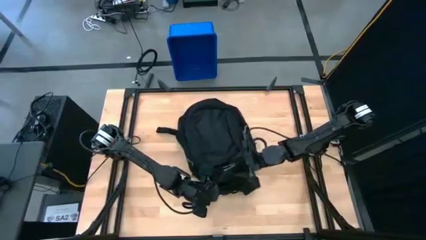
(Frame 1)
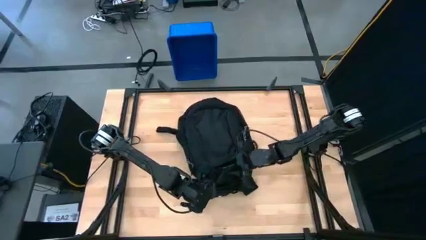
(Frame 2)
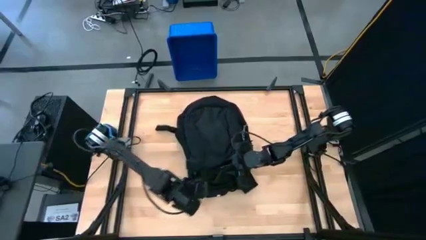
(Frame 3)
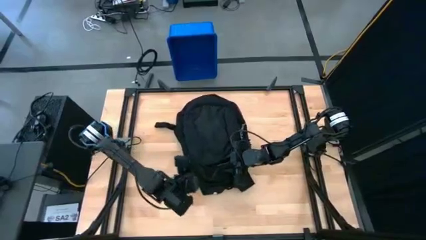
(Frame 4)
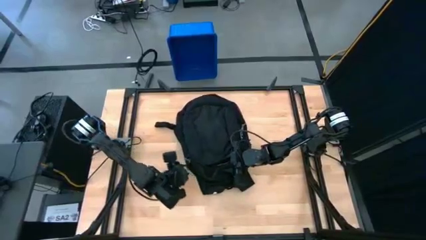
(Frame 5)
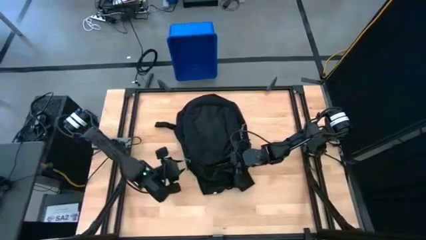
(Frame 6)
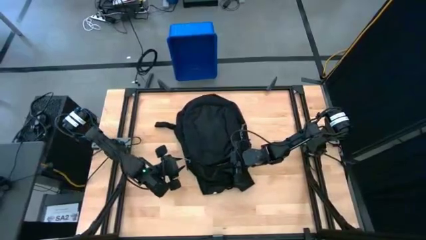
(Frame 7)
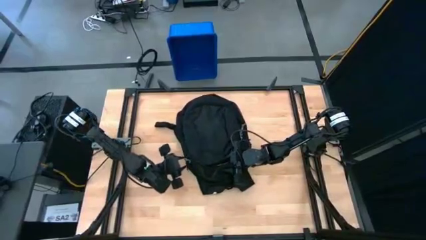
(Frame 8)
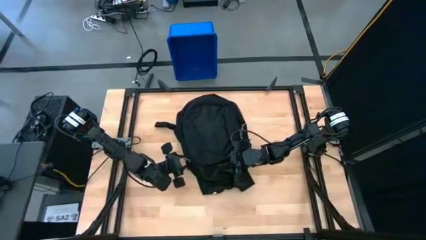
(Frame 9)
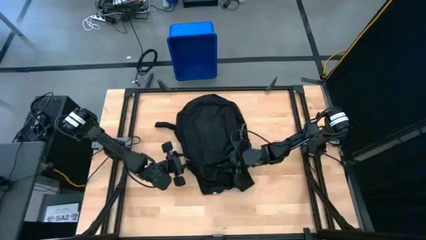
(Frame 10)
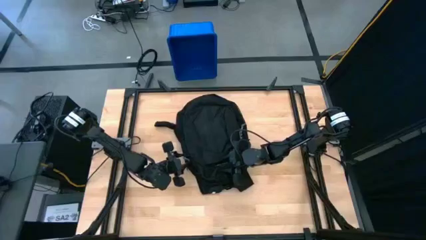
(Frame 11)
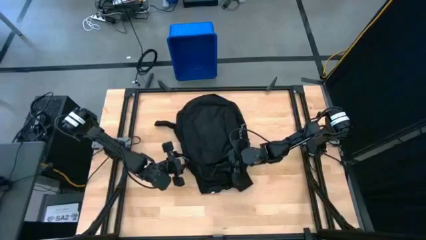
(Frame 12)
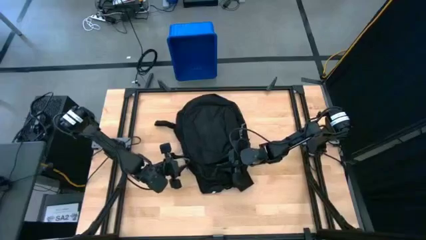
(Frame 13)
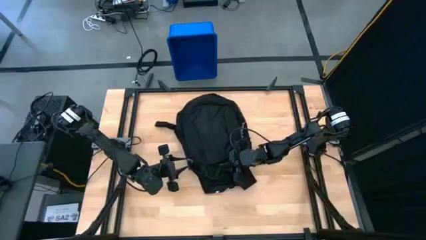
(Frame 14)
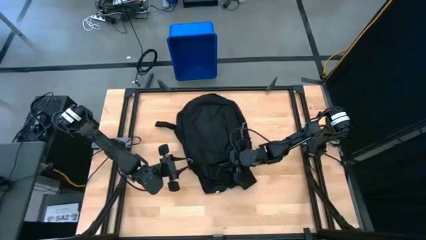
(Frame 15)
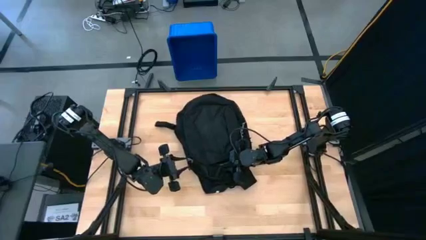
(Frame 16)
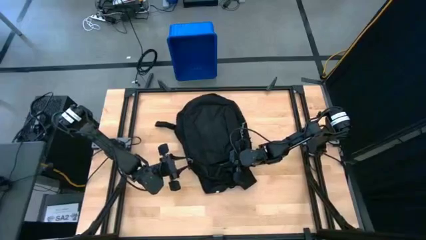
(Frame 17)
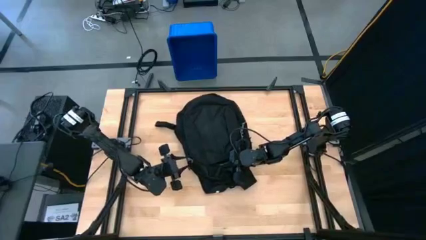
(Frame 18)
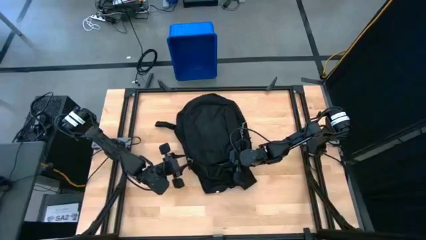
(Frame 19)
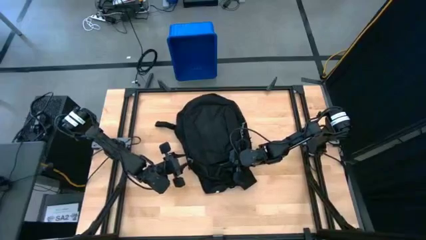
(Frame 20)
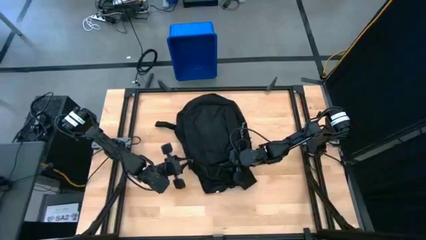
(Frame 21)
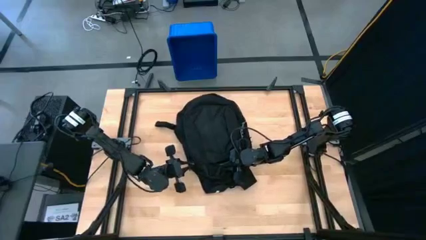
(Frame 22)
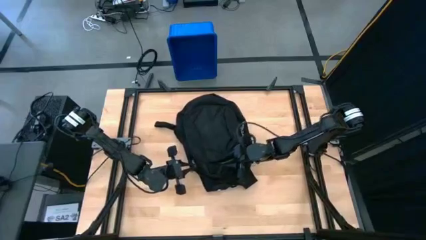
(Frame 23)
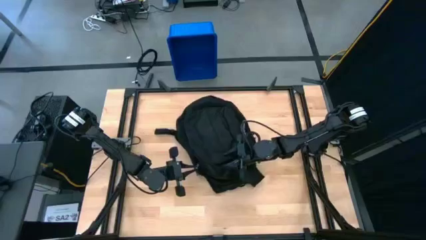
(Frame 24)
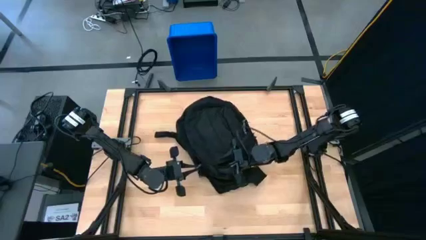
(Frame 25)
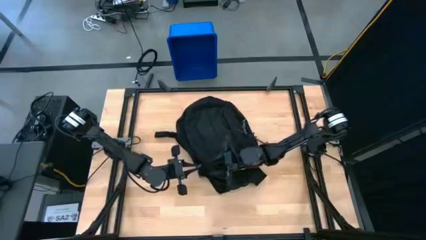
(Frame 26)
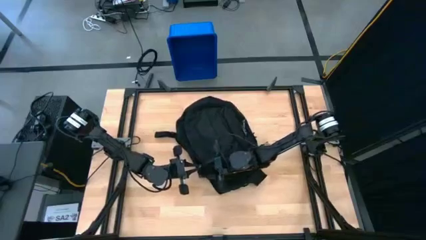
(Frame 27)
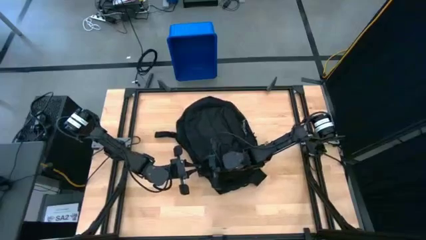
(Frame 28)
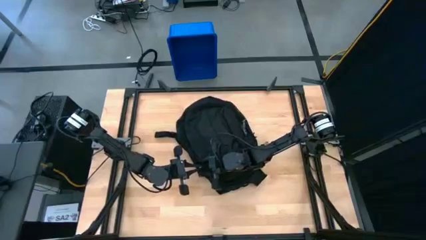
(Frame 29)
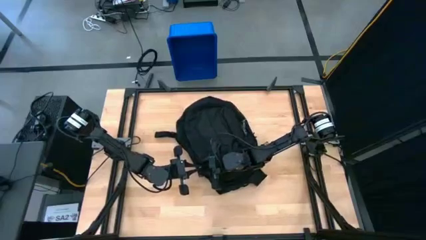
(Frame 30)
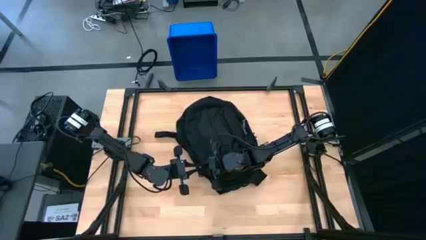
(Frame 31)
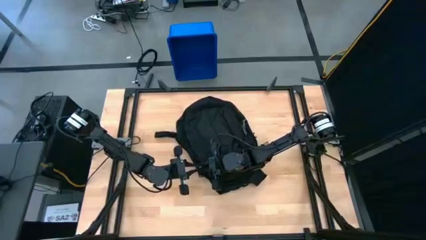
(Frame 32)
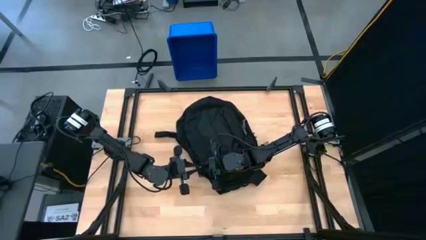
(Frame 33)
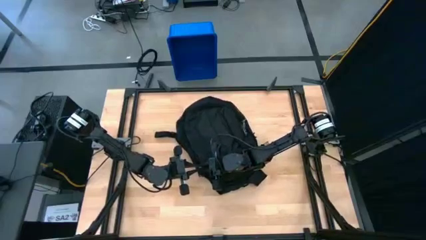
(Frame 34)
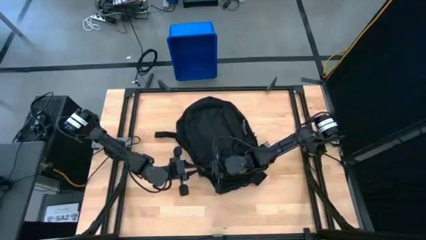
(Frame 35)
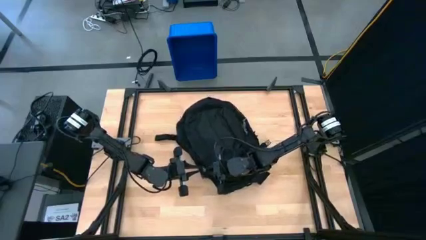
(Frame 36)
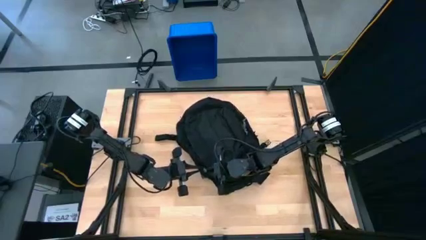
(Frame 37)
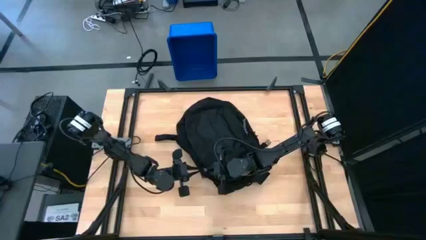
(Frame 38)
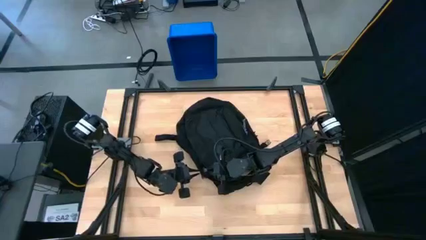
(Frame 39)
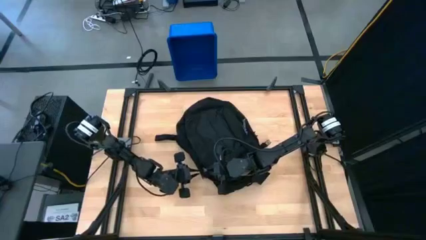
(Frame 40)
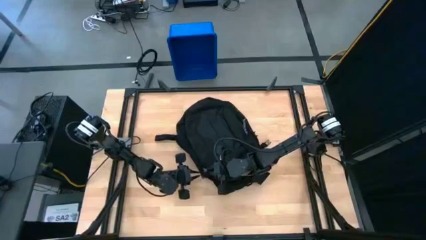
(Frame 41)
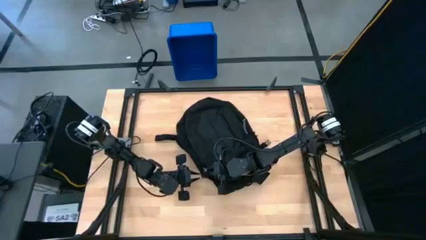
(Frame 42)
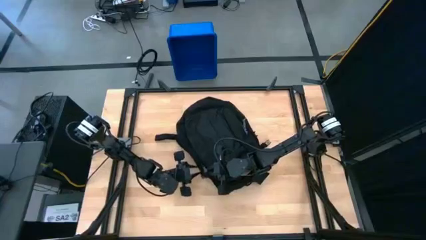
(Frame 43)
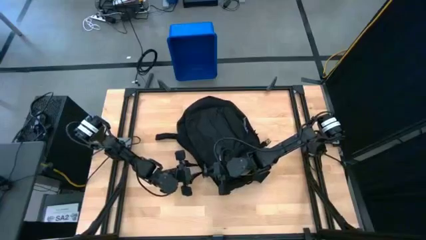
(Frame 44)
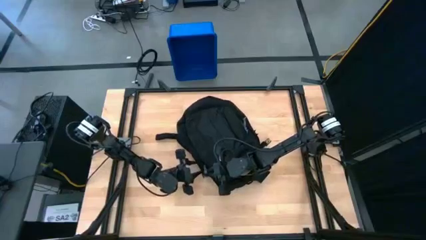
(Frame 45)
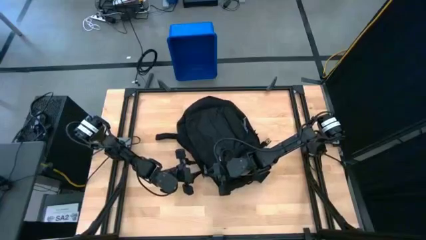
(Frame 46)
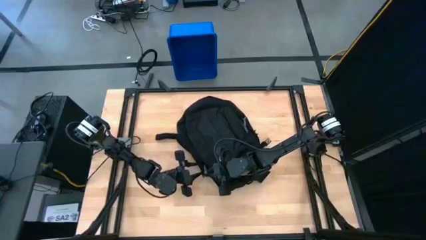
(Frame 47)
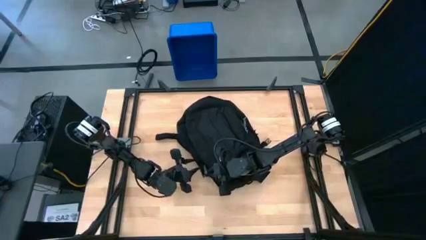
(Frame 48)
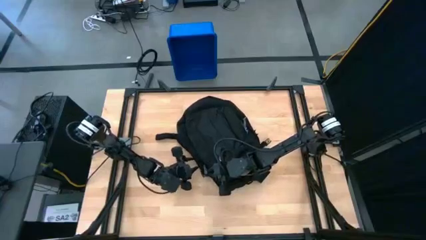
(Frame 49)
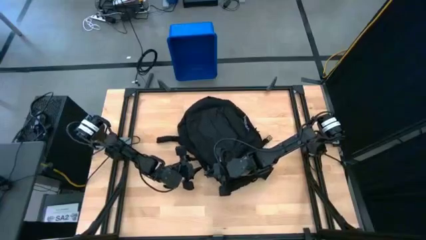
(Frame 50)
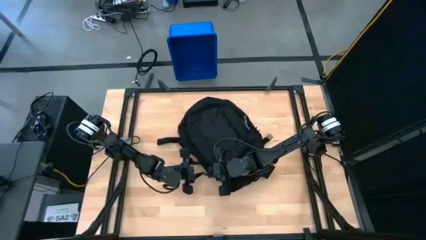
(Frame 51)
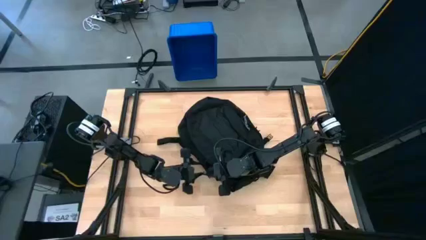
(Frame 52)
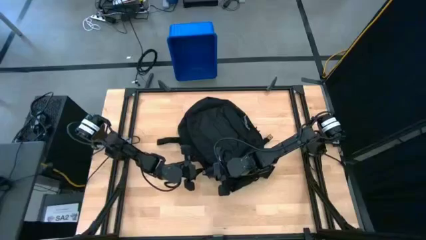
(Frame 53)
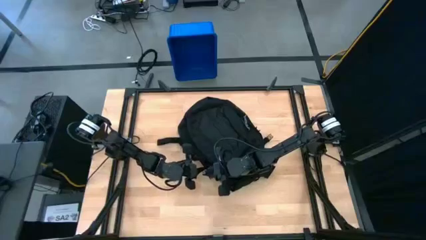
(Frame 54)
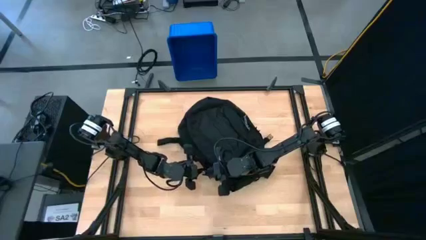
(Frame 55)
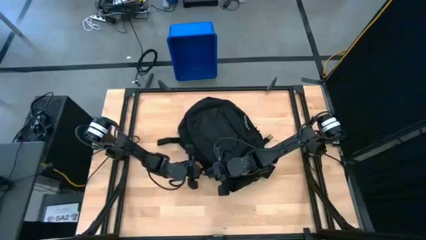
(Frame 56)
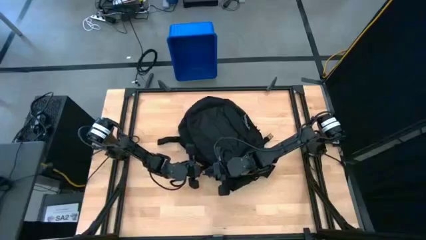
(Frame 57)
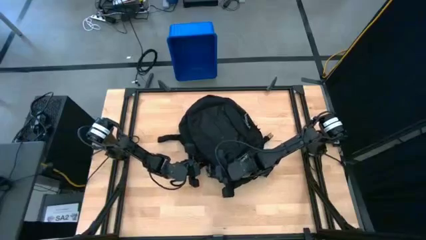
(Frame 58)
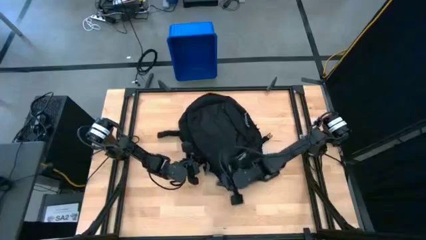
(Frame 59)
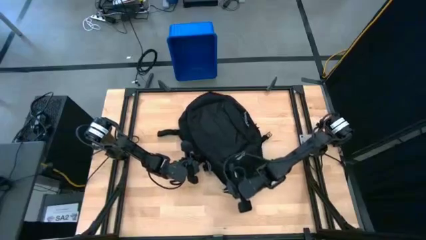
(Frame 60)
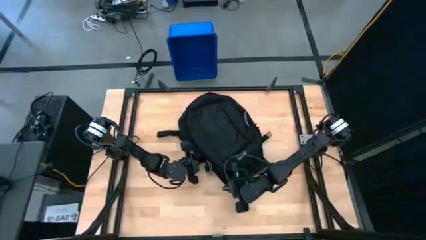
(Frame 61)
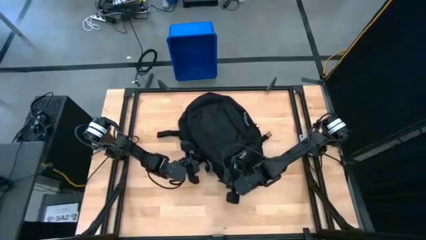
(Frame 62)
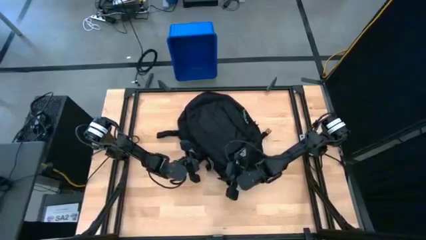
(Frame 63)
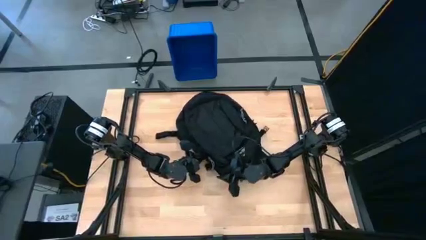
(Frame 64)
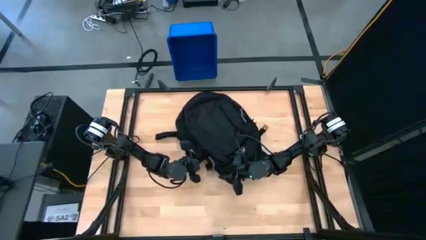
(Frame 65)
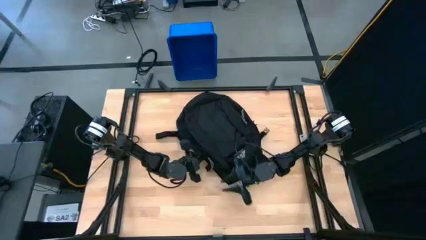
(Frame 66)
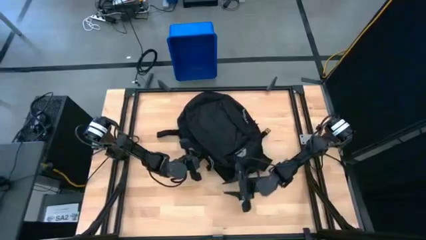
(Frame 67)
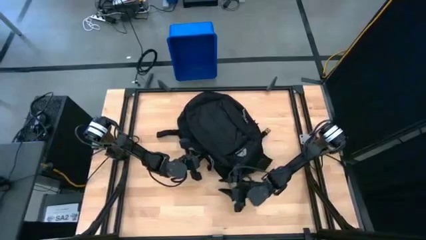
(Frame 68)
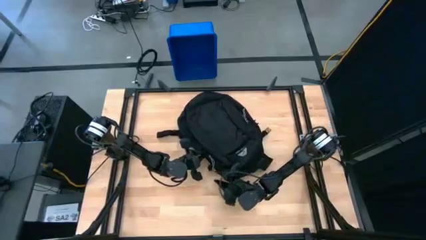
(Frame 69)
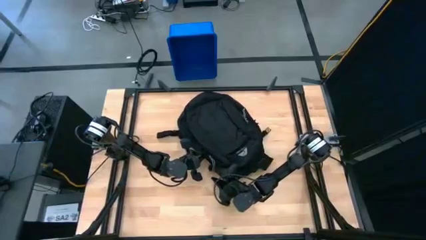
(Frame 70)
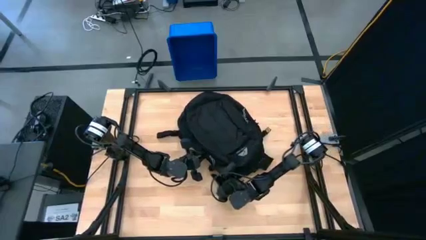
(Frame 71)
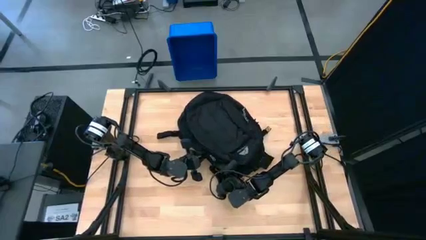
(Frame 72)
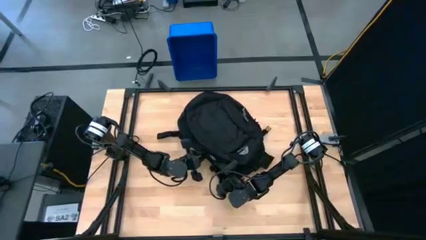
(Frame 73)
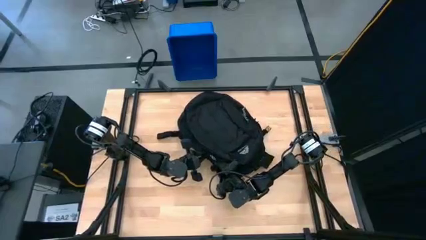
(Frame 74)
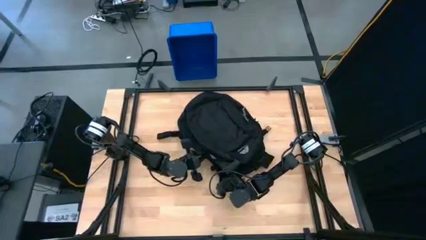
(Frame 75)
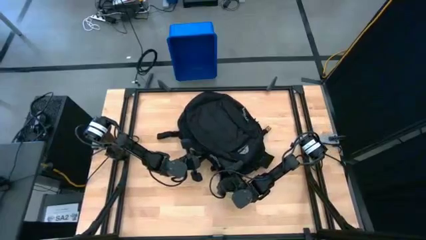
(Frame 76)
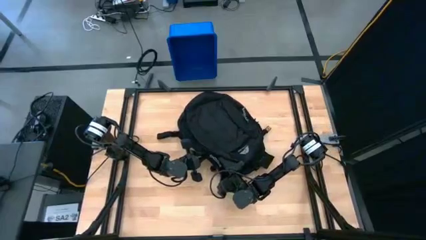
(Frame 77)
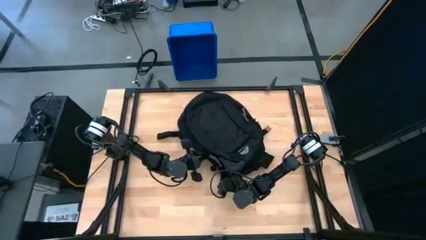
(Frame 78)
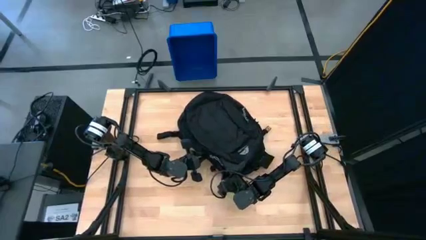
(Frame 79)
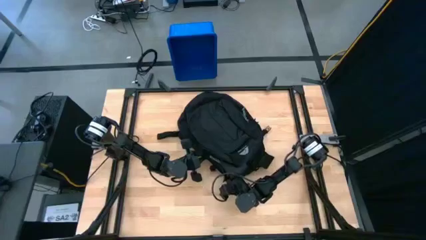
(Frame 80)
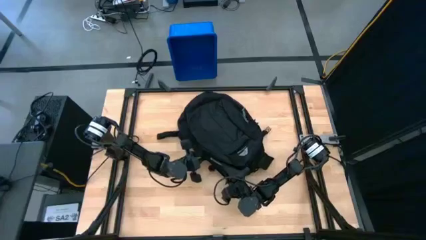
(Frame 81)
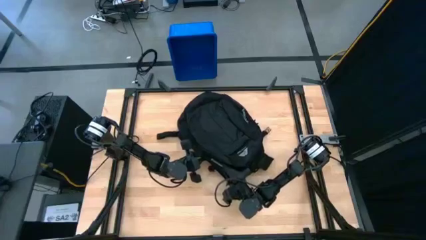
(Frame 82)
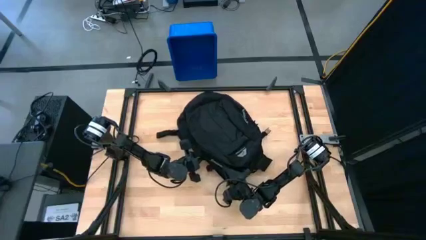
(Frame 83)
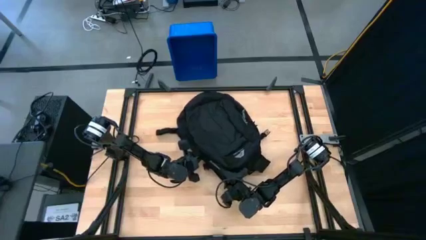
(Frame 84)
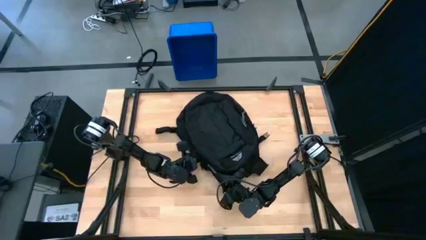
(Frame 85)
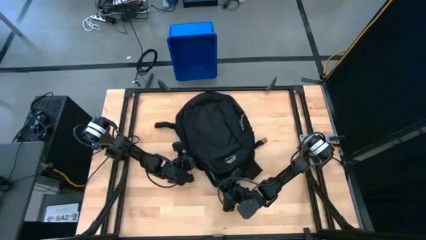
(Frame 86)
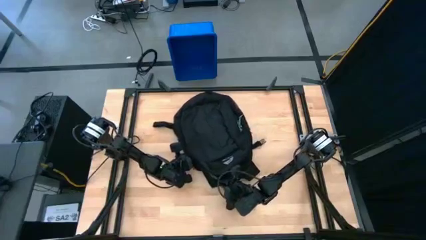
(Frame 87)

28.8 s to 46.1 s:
Task: Unpack backpack
Open the backpack
